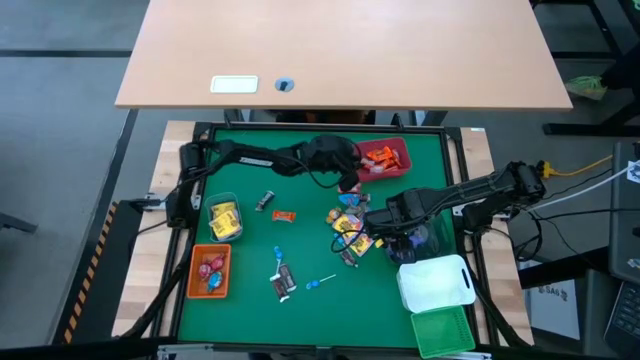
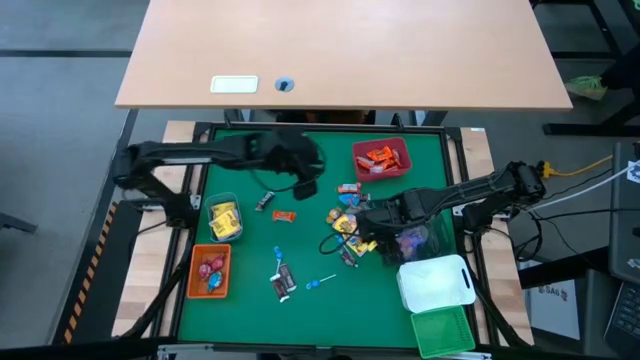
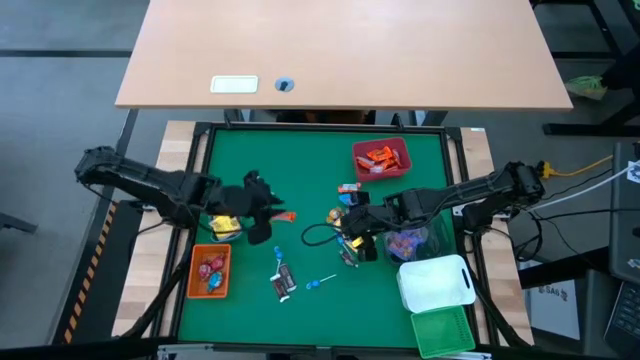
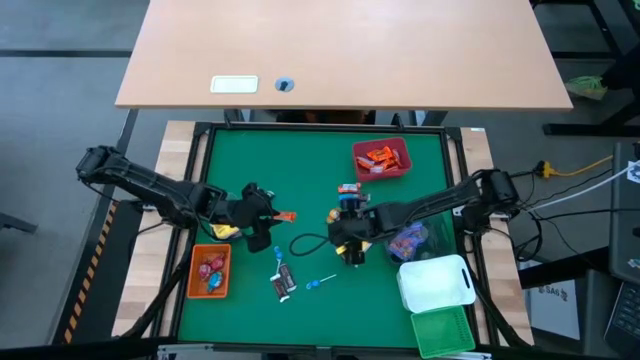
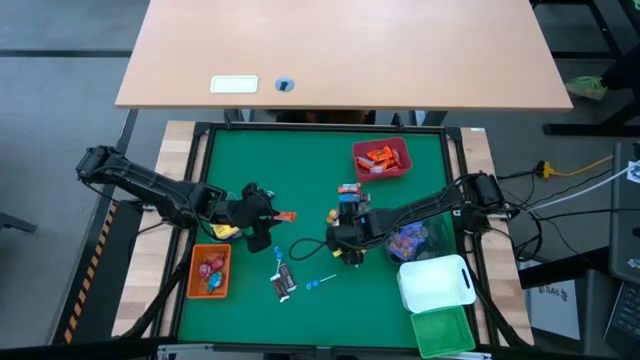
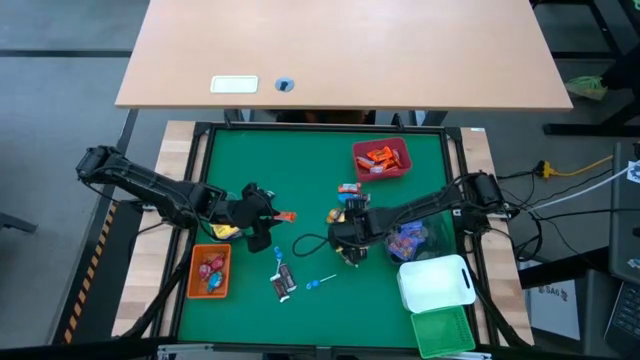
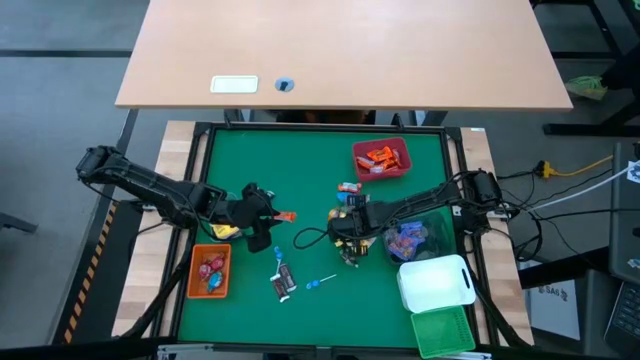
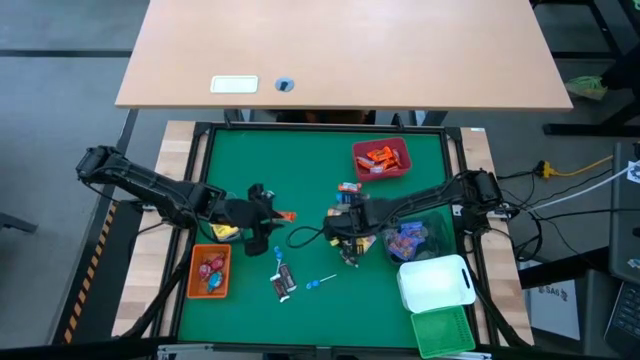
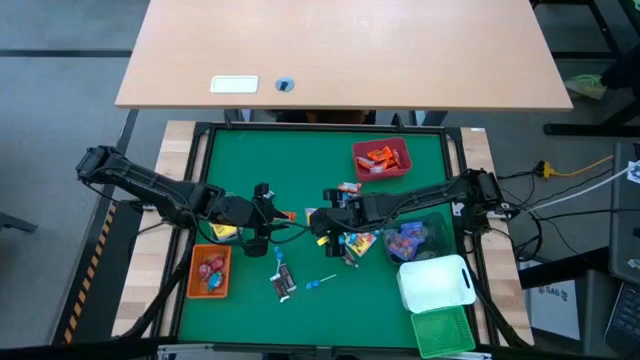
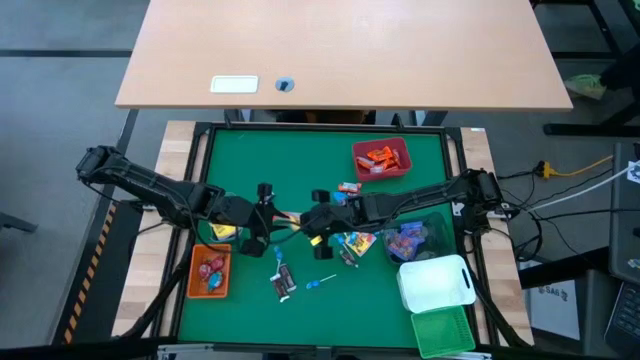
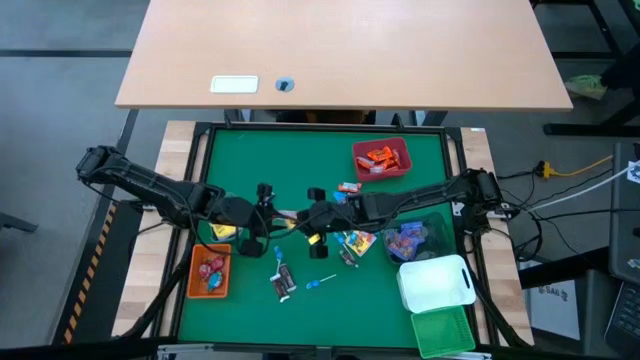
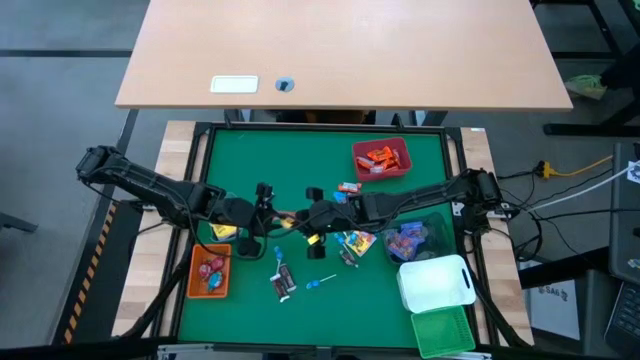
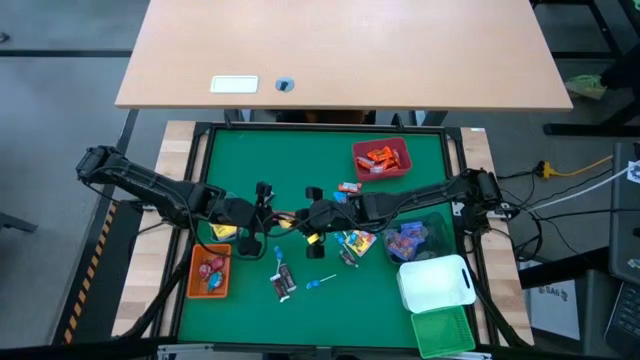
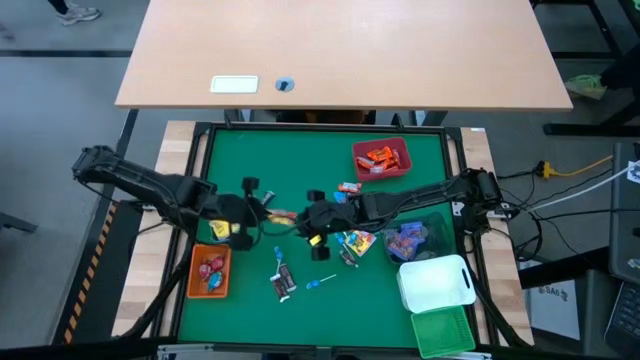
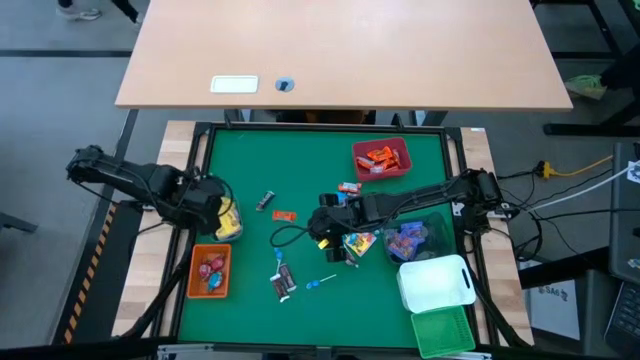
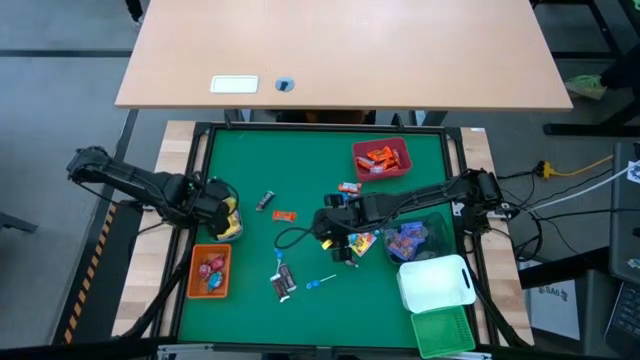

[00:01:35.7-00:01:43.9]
Task: Sort candy
Put the yellow candy into the blue bin

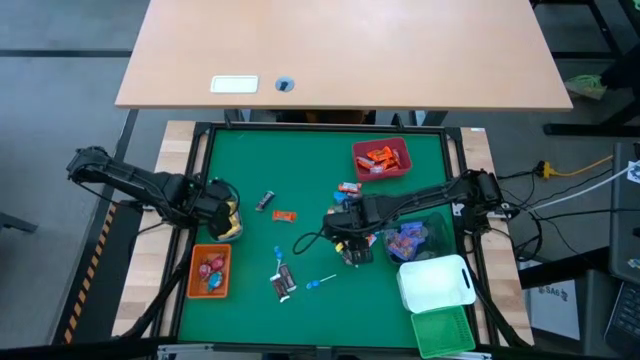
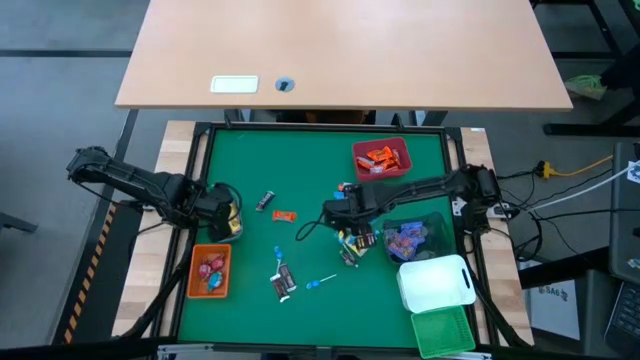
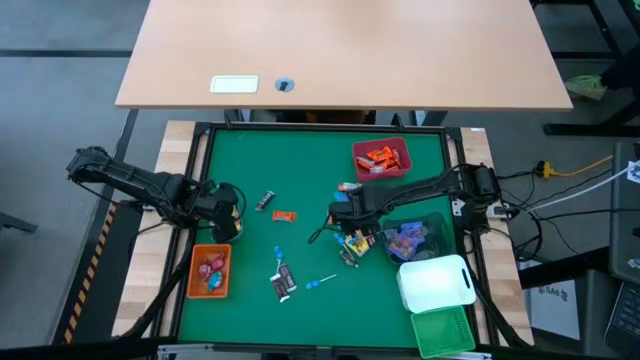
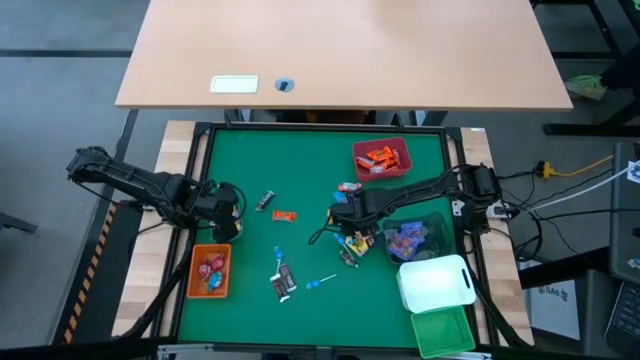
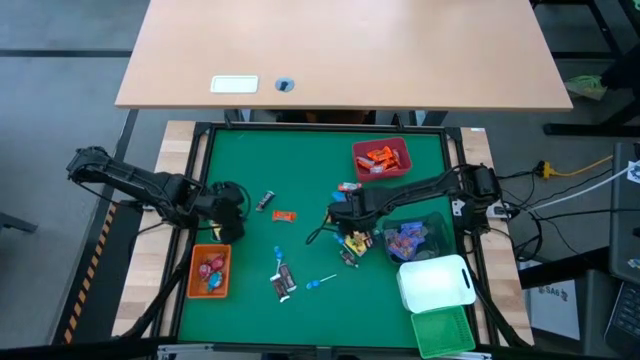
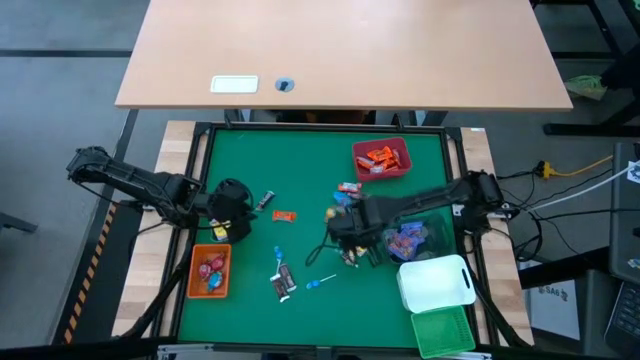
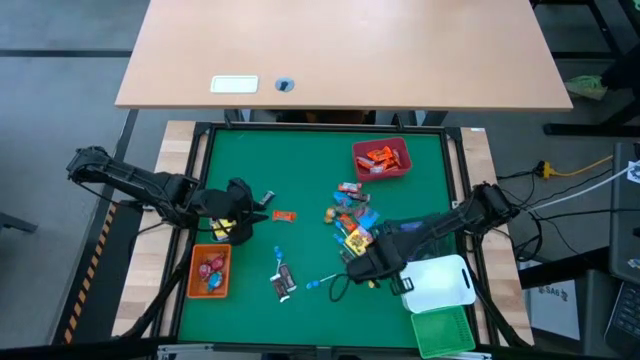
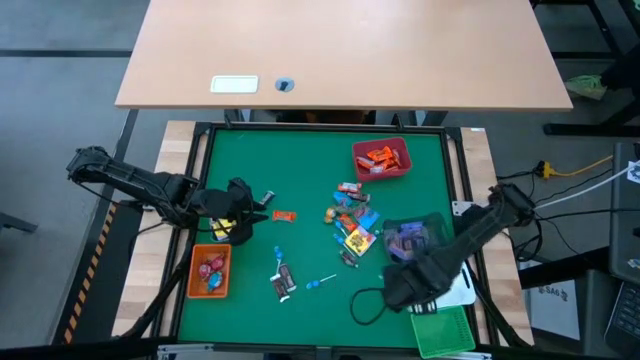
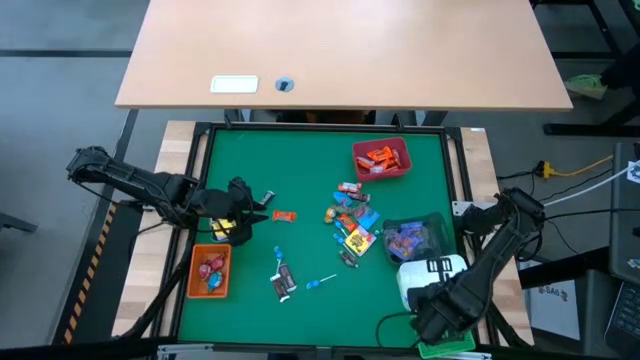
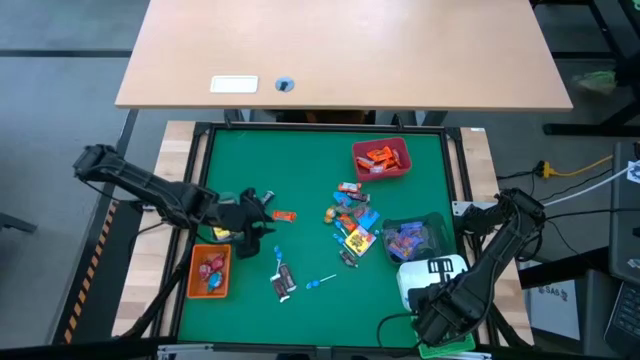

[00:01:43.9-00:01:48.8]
Put the blue candy into the white bin

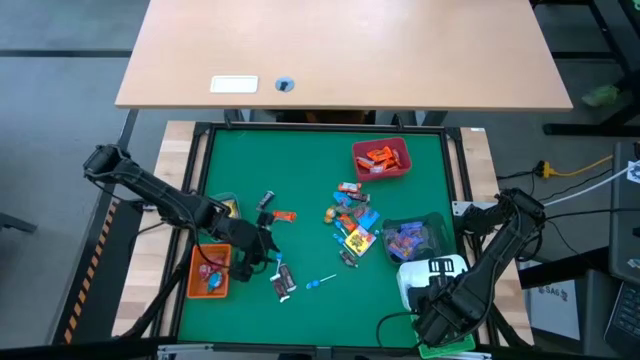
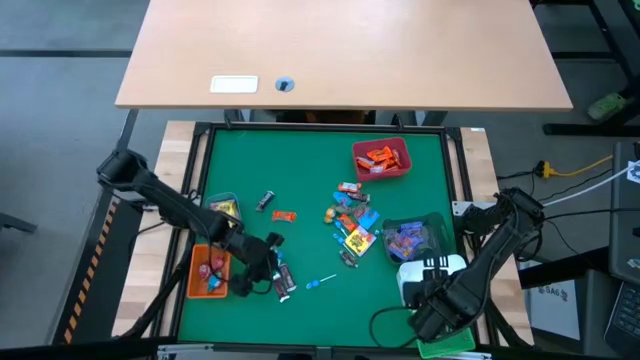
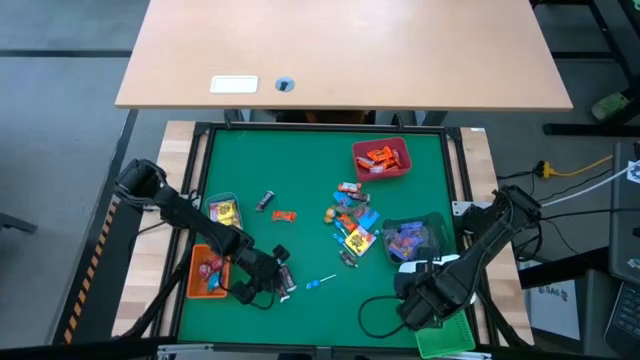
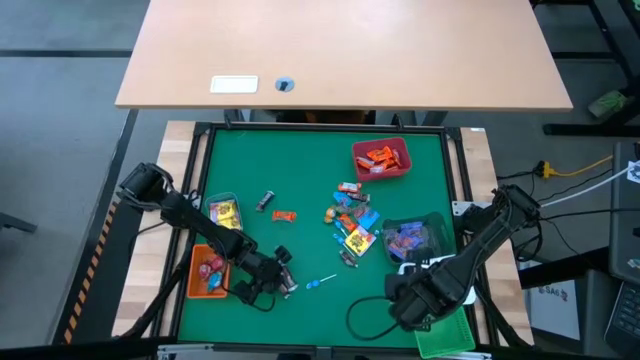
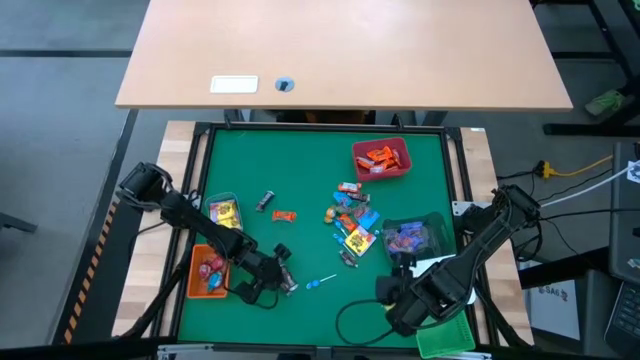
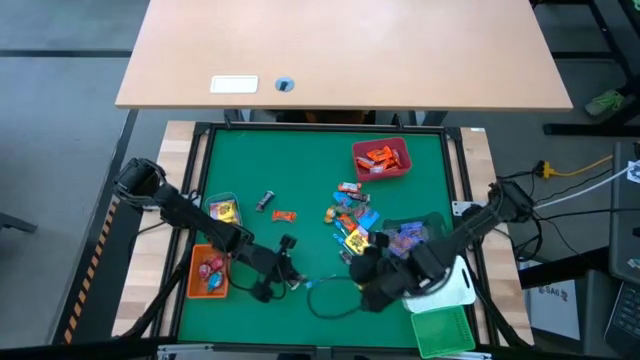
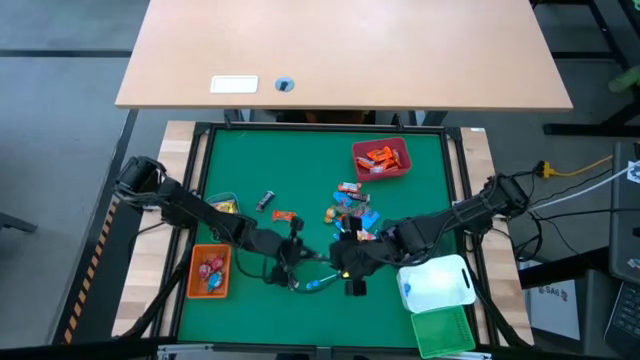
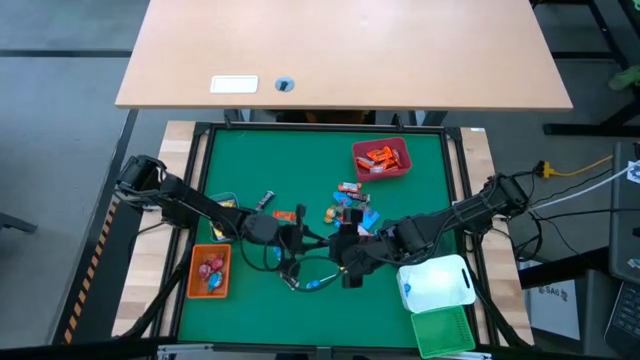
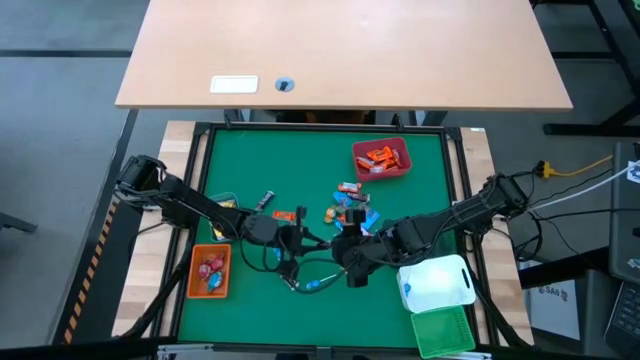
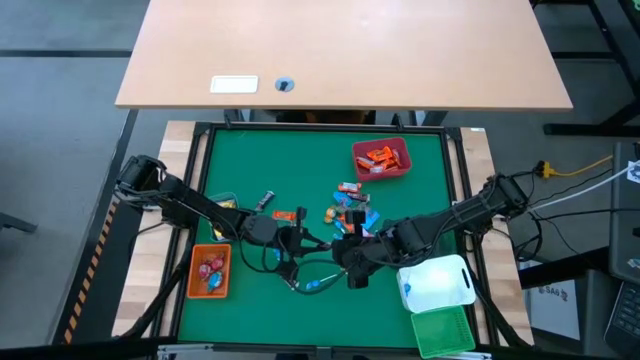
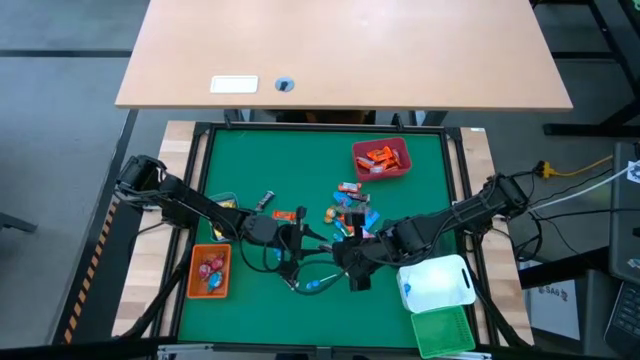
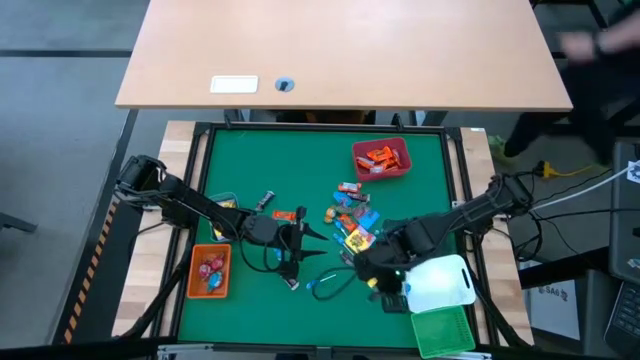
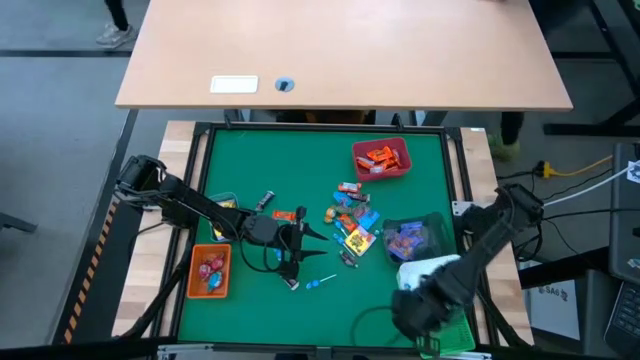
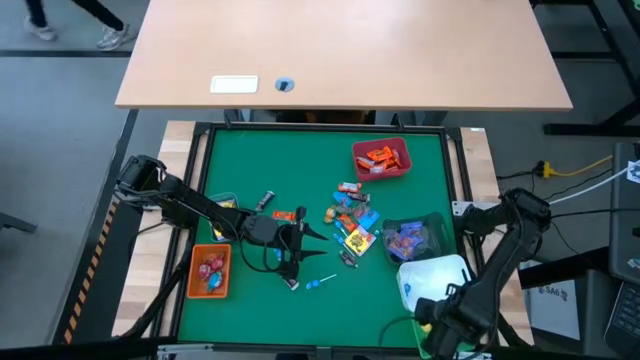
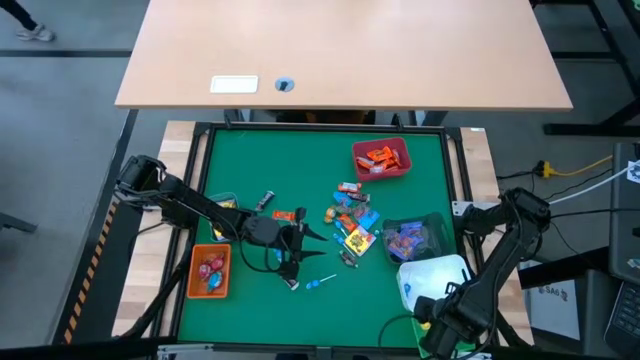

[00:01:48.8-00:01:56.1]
Put the brown chocolate bar into the green bin

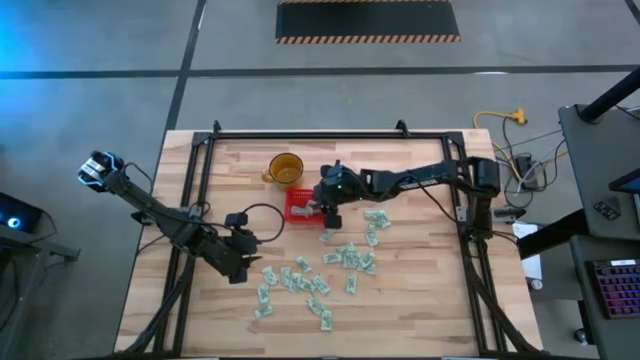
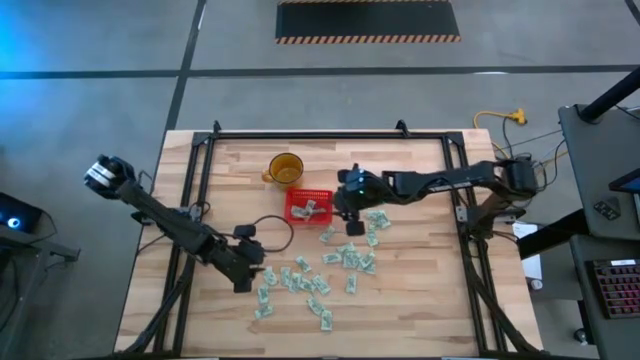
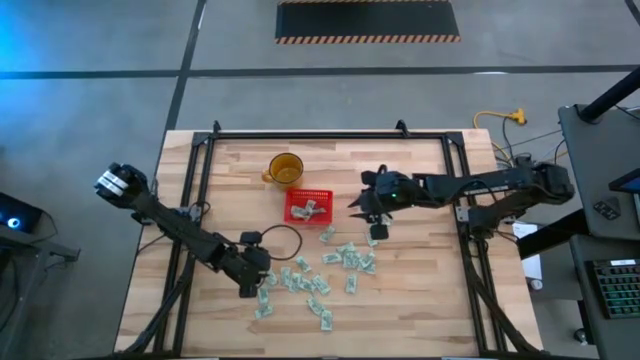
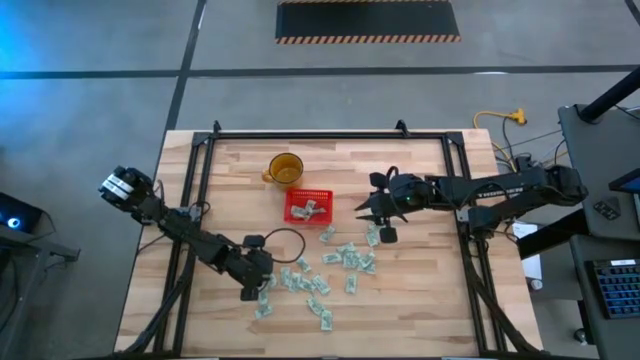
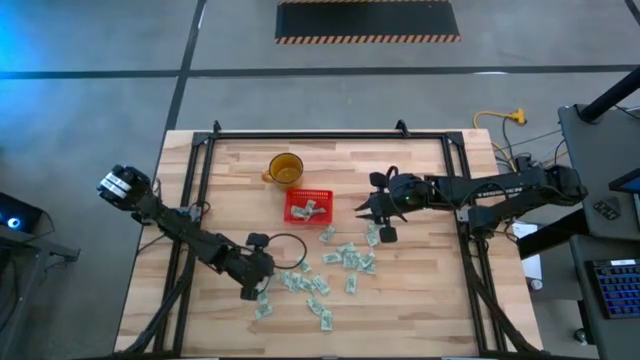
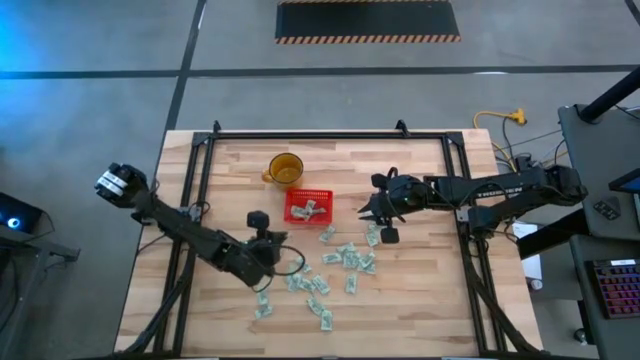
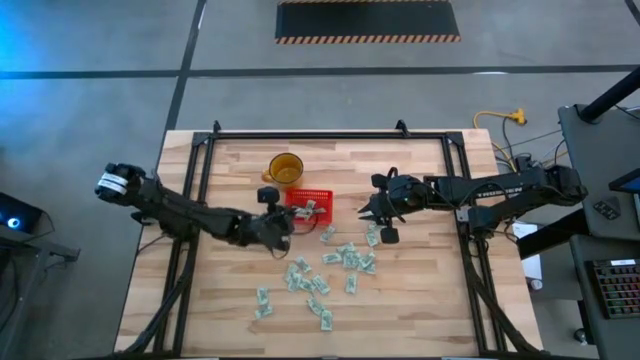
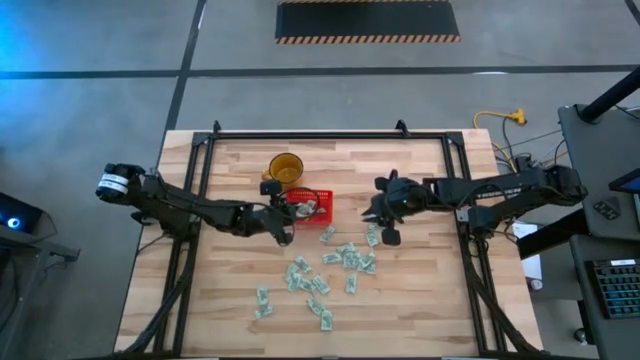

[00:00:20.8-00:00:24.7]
Task: Pick and place Stevia / Truvia into bins
Put the gray stevia packet into the red basket
